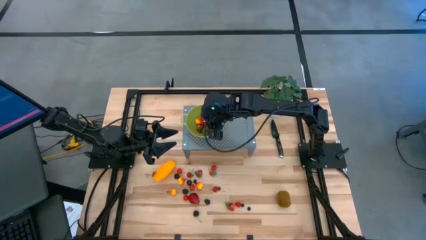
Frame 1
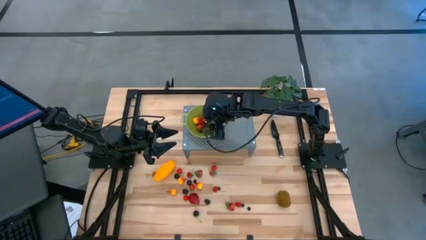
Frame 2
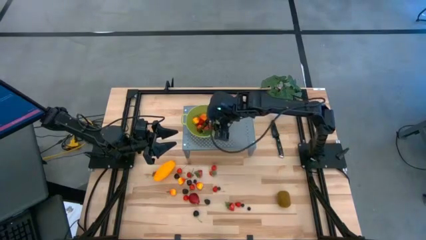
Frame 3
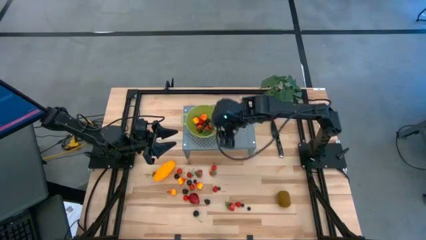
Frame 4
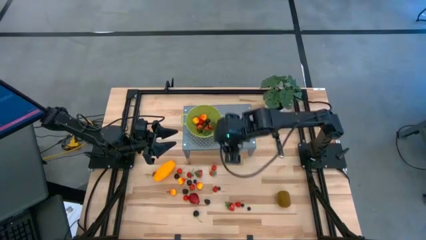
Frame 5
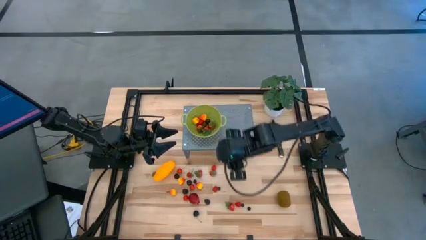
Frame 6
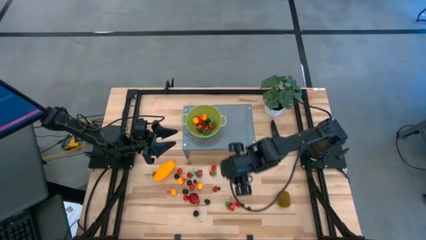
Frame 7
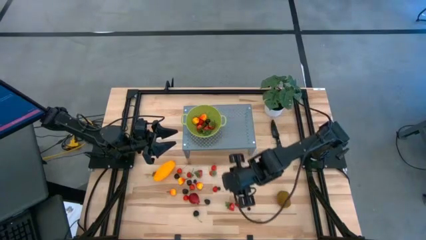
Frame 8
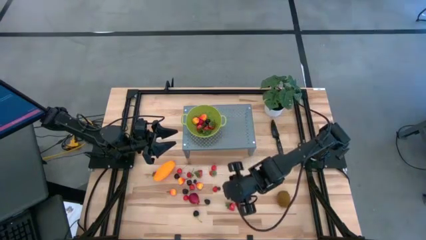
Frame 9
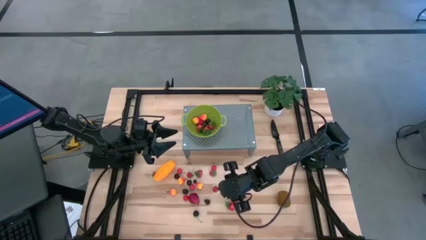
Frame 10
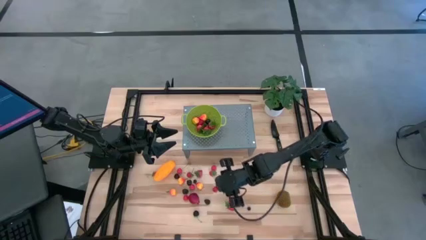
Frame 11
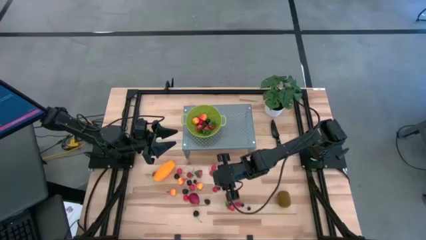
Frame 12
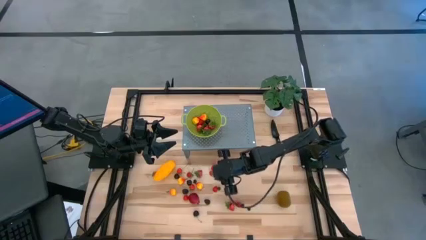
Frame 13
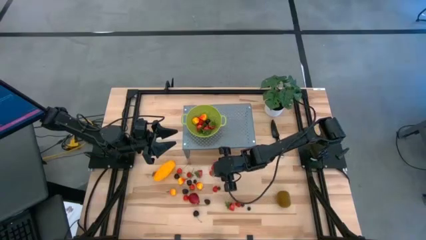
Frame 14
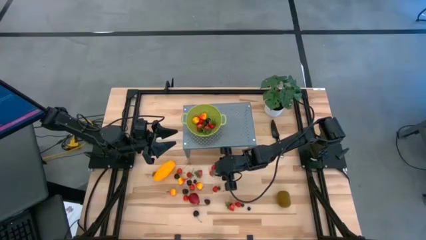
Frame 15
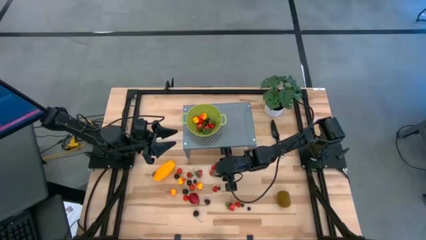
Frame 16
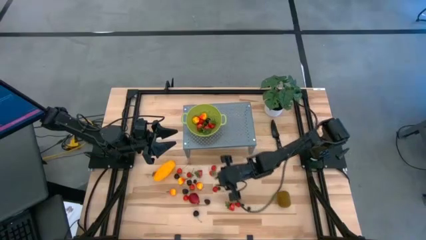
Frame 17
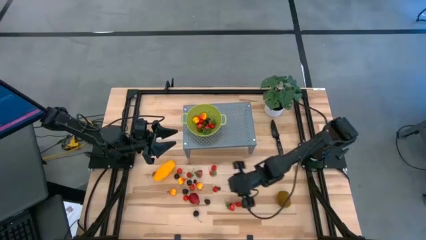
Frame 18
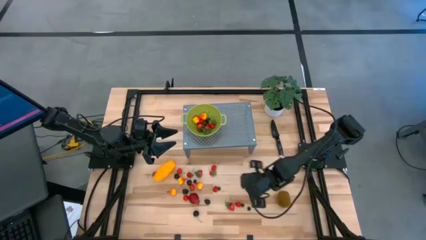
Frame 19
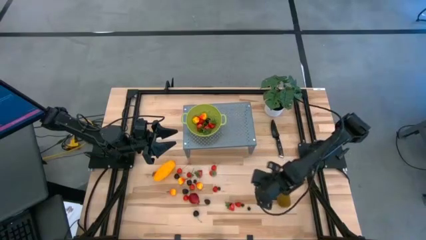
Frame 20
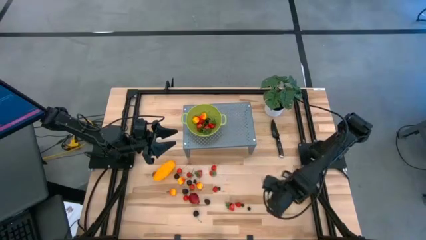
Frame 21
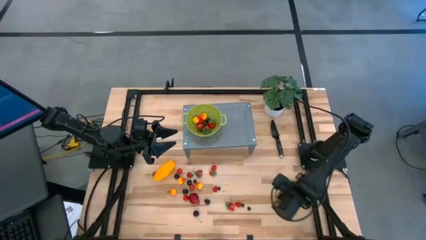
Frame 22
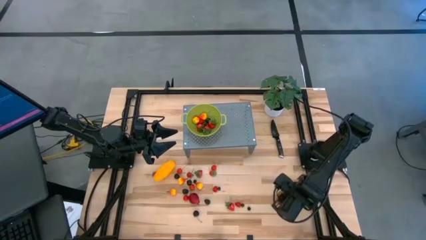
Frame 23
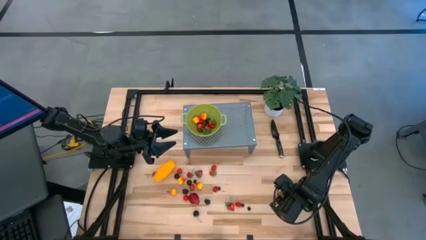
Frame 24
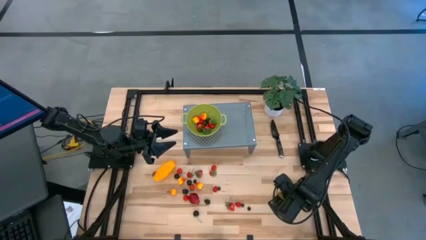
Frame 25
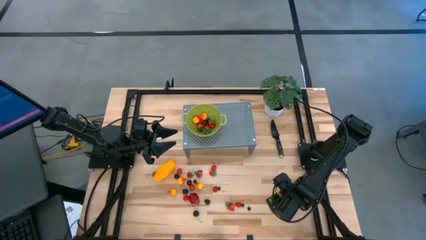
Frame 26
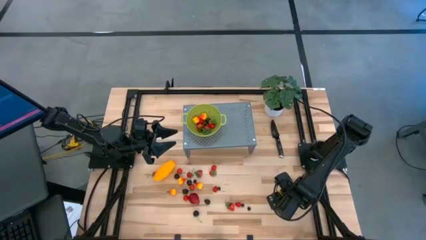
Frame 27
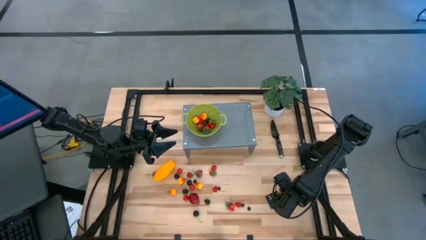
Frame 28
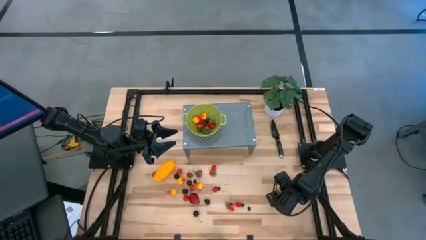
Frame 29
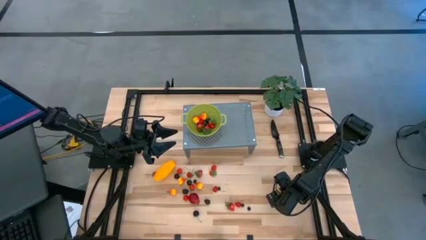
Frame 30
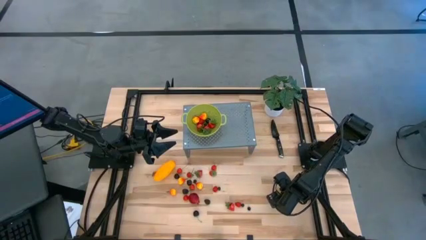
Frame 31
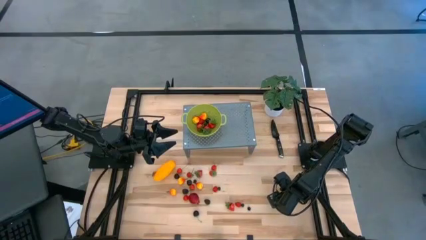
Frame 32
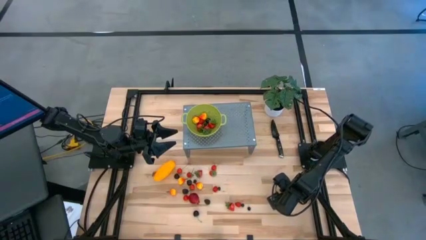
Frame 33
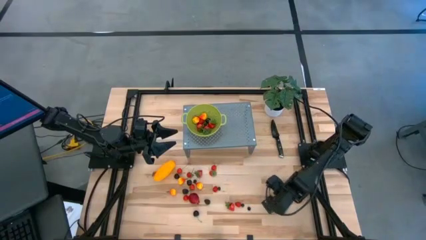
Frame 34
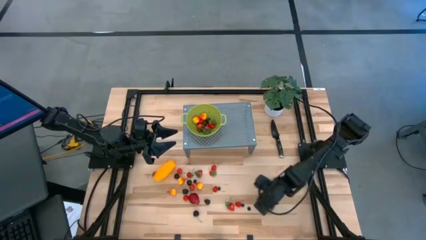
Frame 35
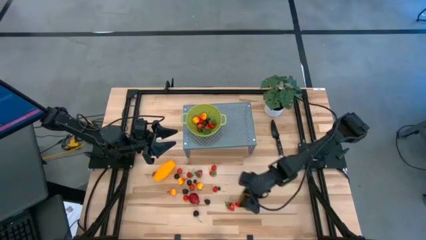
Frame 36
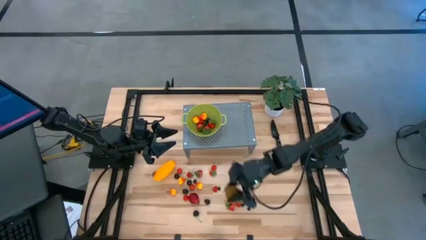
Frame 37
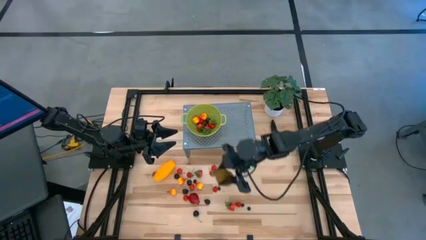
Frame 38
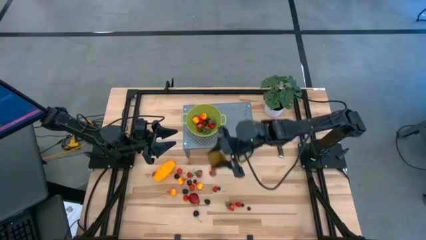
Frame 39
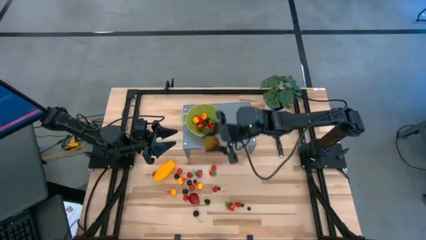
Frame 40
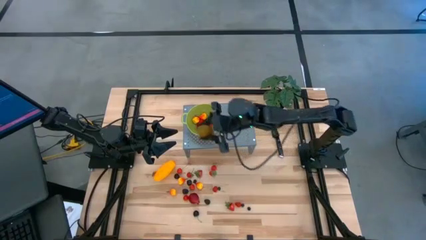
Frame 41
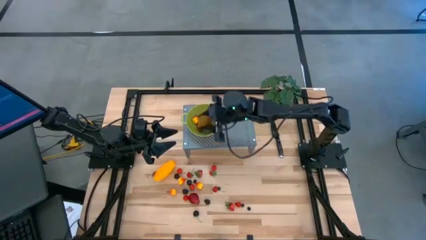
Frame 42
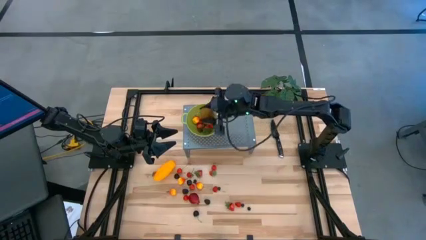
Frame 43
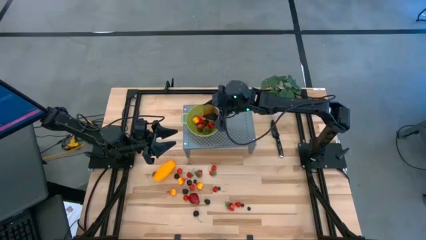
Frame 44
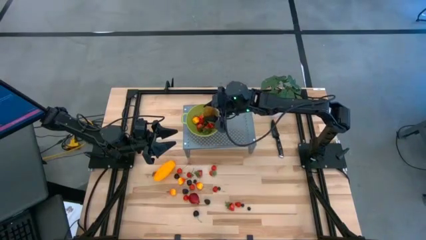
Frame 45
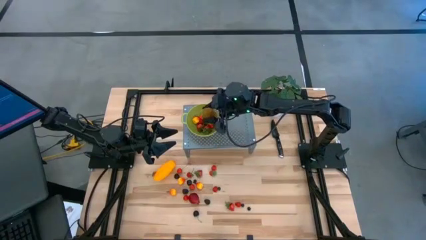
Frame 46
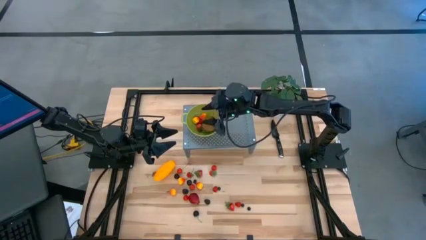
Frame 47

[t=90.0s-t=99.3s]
Task: Pick & Place Fruit
Put the kiwi into the green strainer bowl on the shelf

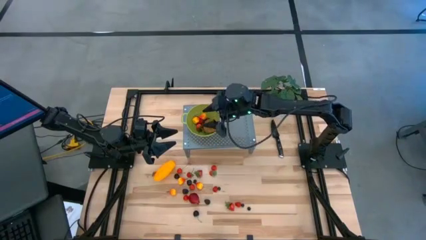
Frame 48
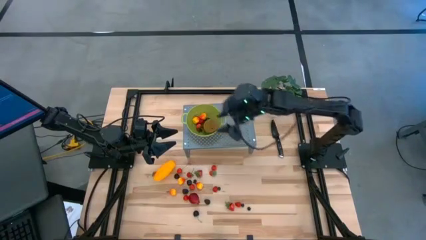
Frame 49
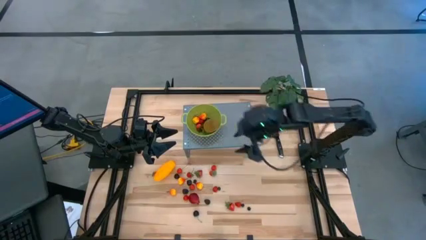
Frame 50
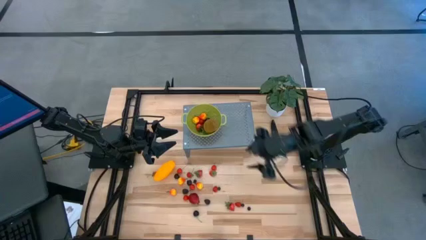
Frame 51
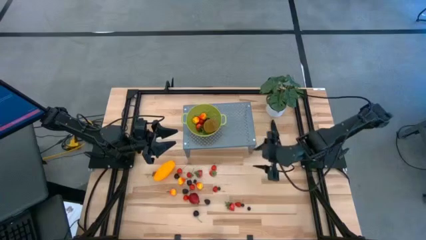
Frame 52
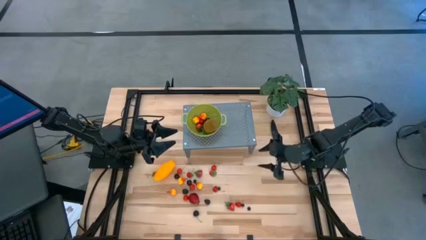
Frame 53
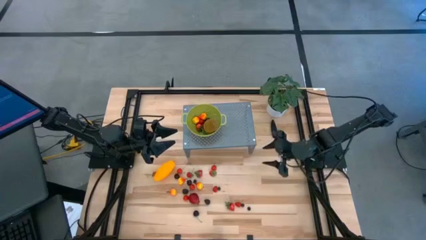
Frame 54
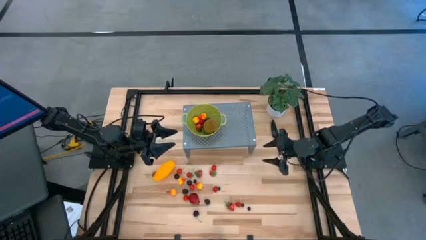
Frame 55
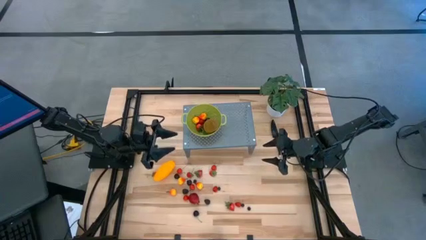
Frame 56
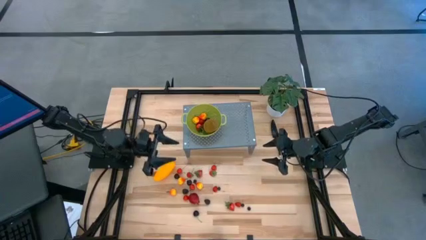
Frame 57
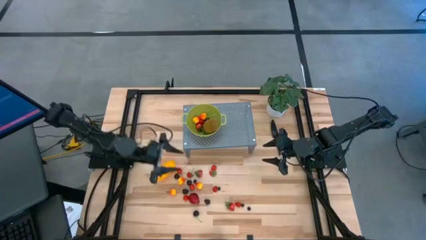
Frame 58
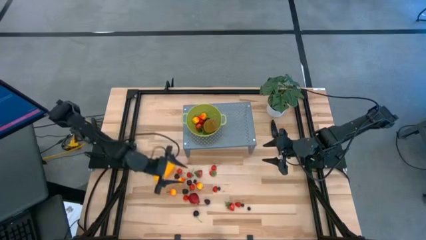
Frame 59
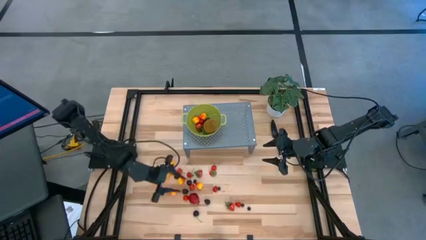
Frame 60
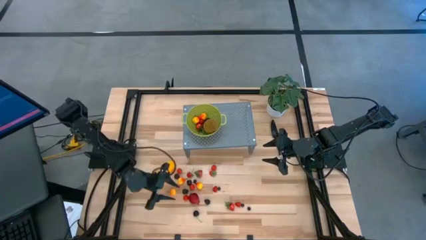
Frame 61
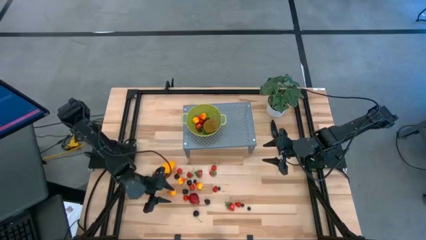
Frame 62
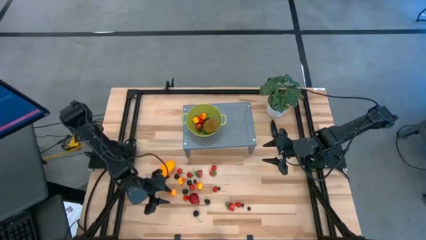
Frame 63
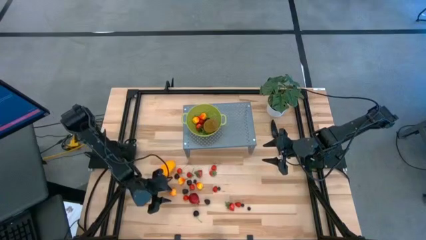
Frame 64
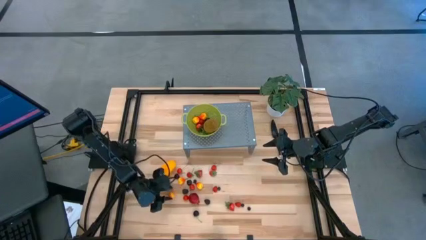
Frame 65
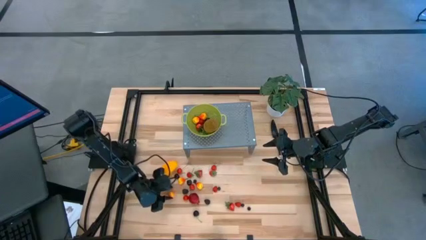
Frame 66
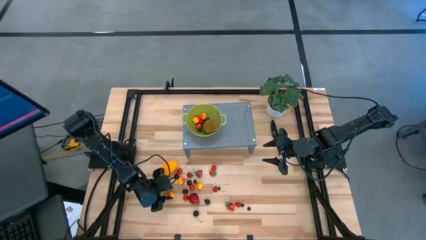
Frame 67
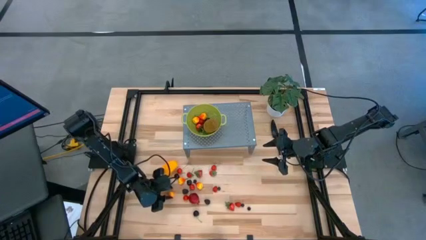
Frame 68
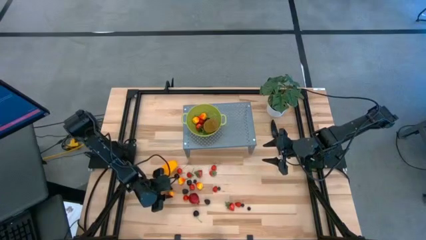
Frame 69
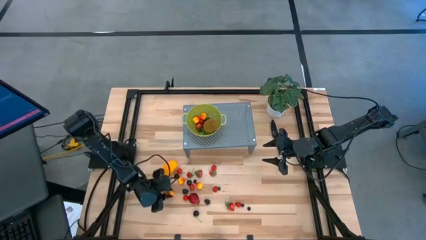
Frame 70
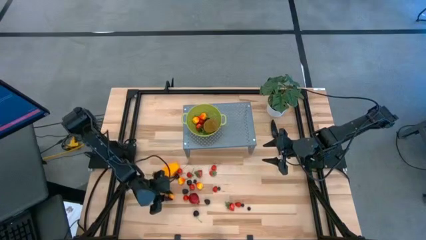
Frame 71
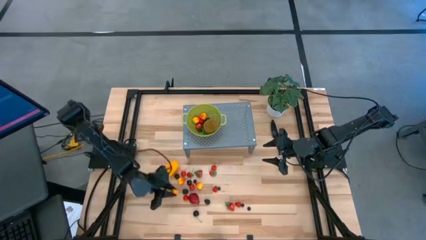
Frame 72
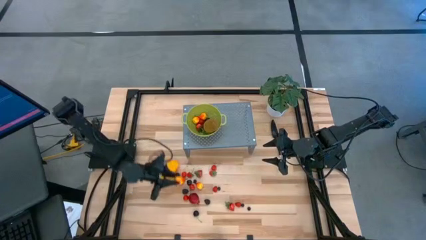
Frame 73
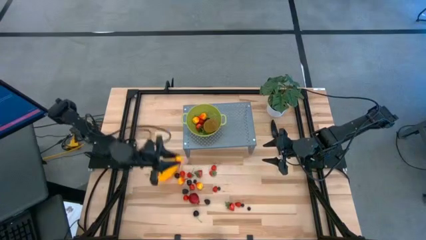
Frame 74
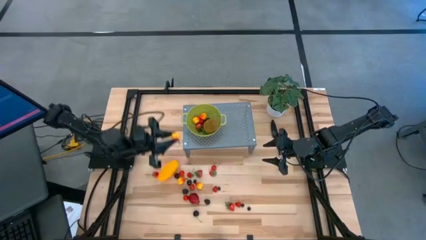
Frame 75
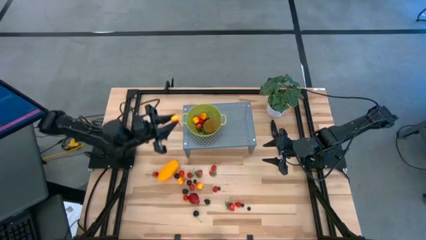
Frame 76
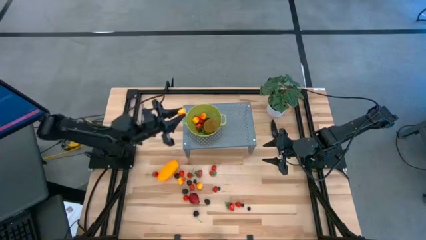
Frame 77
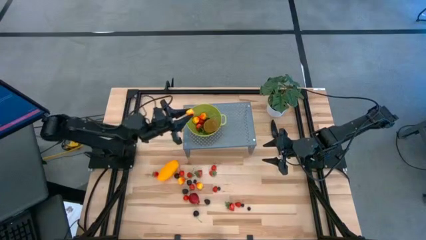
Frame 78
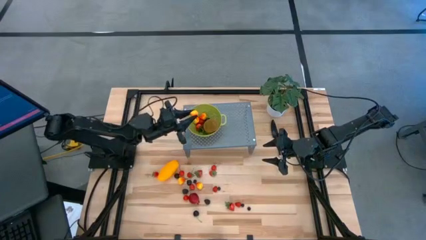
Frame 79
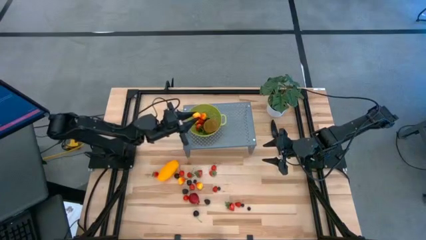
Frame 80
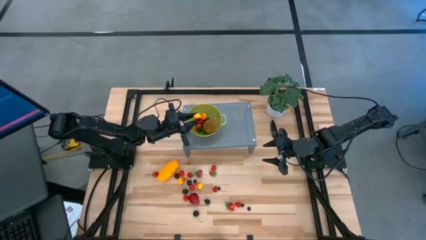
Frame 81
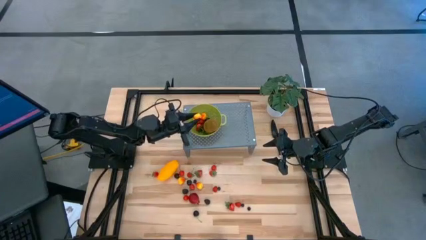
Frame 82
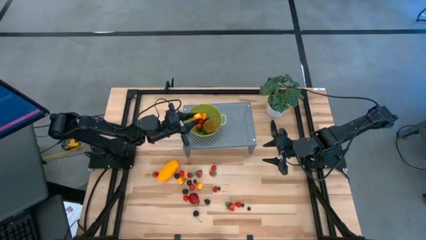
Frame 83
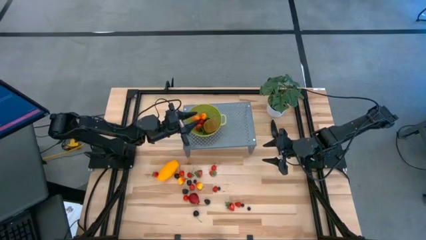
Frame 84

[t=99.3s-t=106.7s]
Put the peach into the green strainer bowl on the shelf
